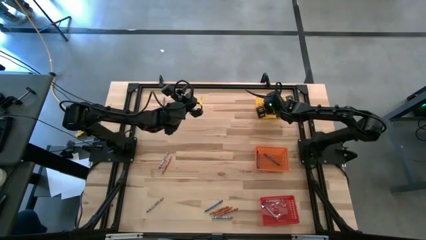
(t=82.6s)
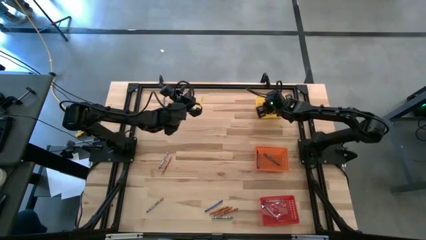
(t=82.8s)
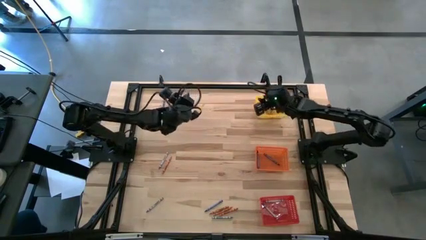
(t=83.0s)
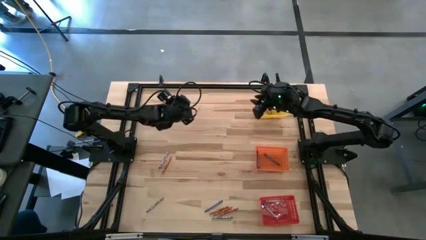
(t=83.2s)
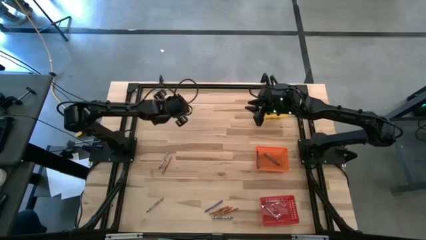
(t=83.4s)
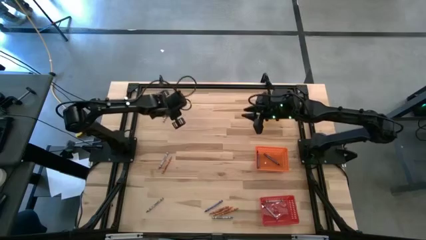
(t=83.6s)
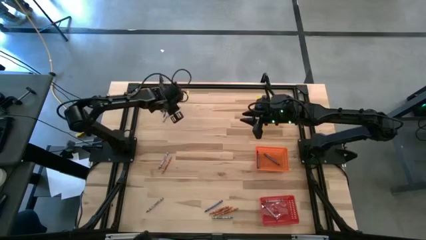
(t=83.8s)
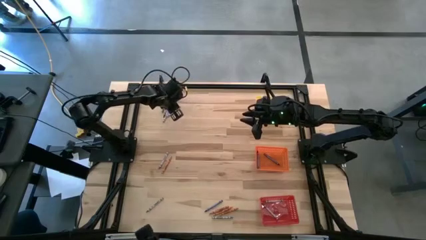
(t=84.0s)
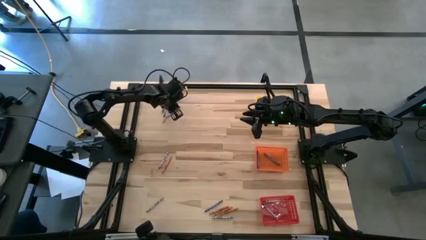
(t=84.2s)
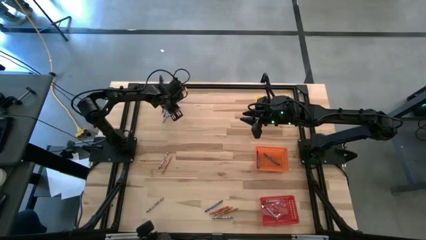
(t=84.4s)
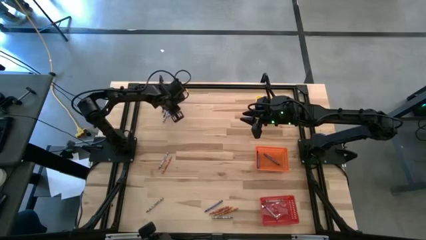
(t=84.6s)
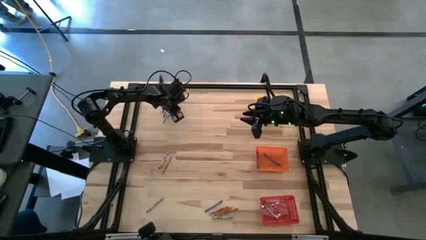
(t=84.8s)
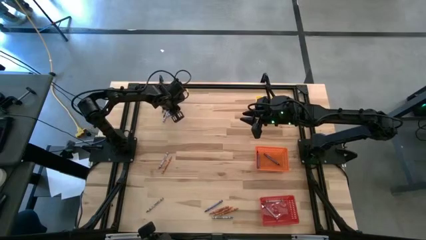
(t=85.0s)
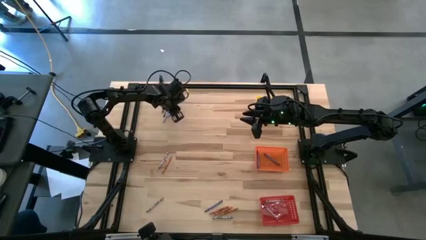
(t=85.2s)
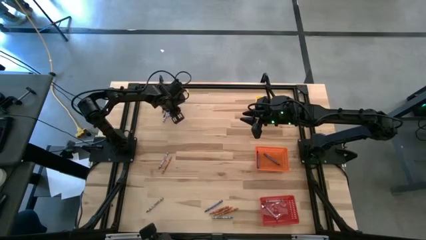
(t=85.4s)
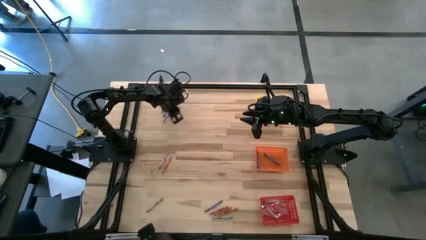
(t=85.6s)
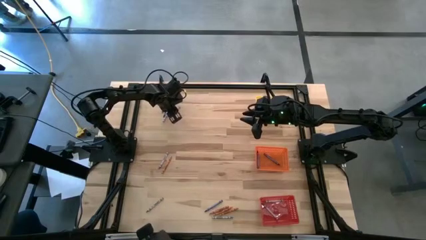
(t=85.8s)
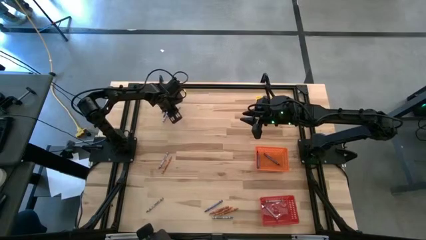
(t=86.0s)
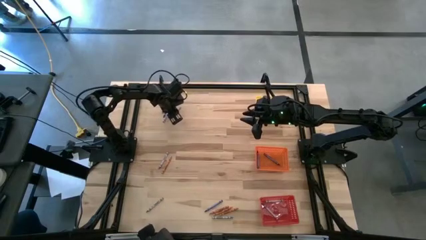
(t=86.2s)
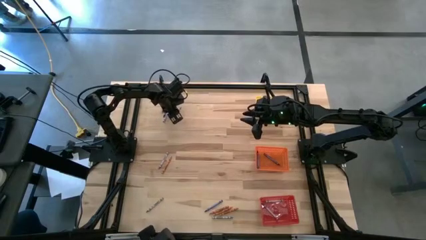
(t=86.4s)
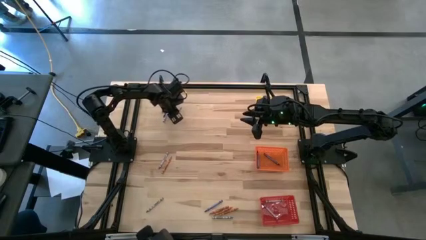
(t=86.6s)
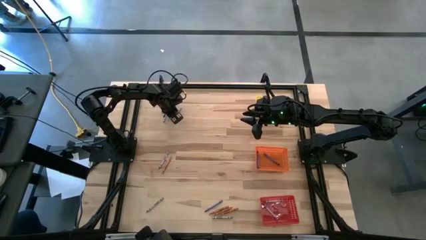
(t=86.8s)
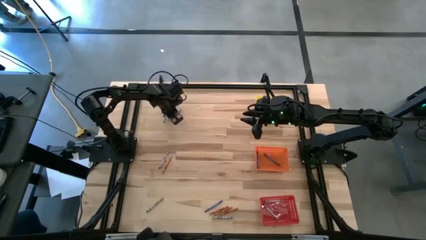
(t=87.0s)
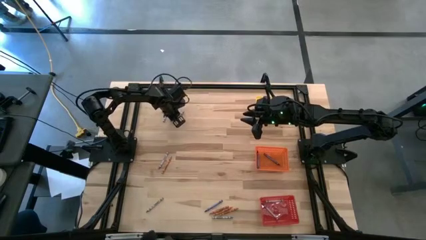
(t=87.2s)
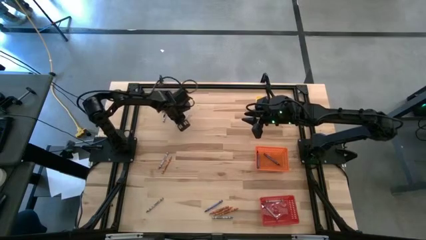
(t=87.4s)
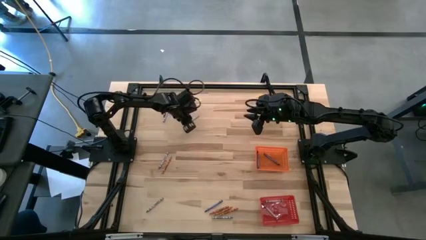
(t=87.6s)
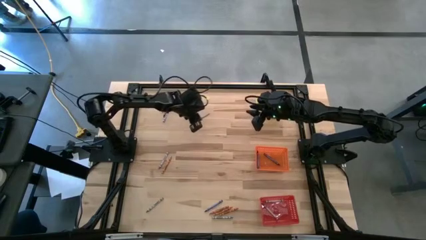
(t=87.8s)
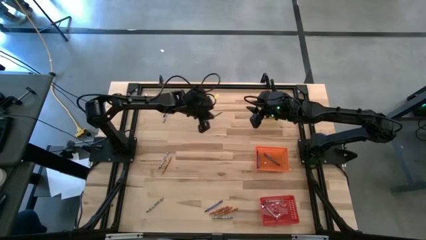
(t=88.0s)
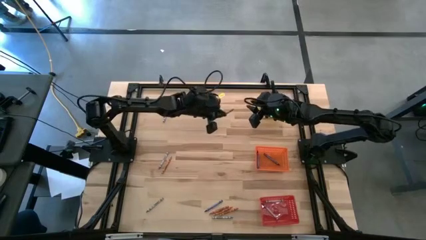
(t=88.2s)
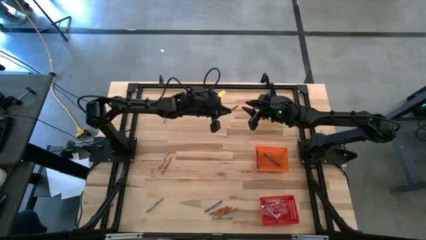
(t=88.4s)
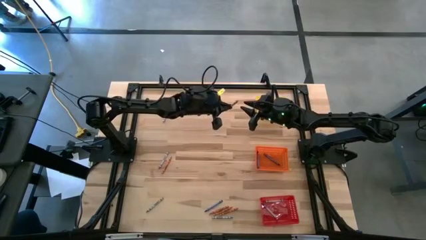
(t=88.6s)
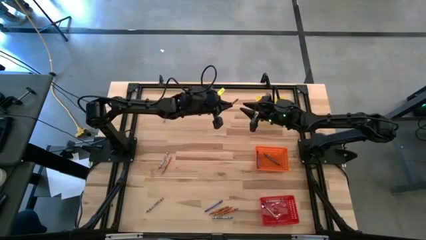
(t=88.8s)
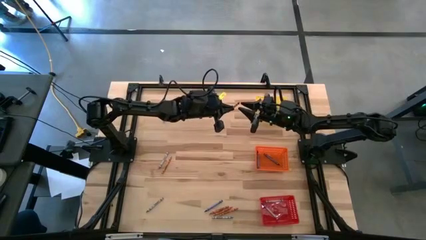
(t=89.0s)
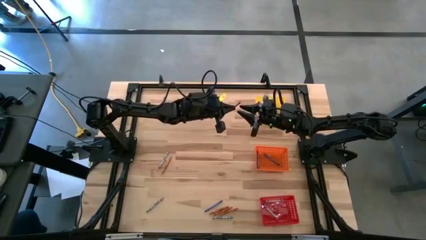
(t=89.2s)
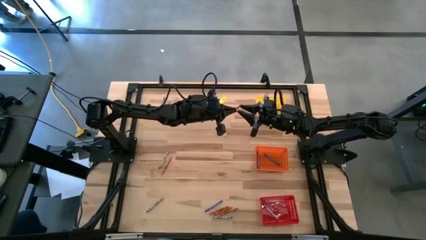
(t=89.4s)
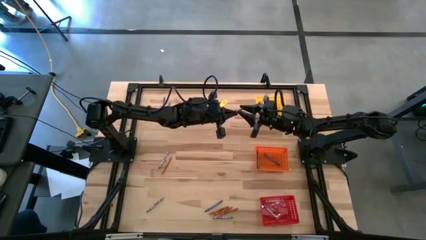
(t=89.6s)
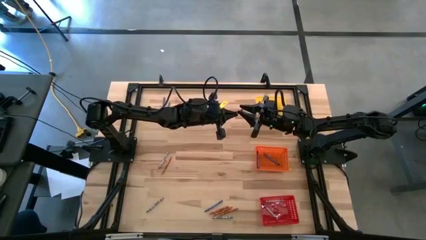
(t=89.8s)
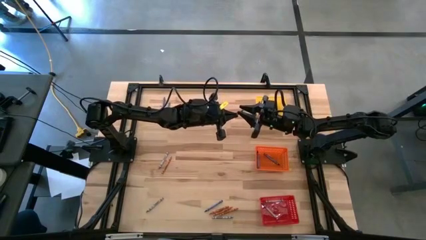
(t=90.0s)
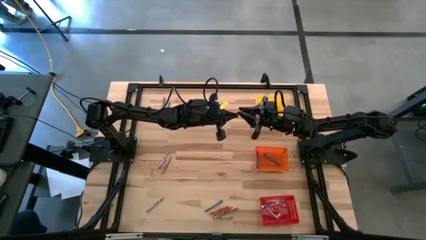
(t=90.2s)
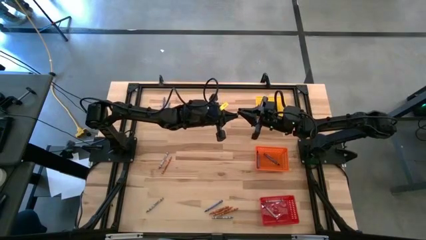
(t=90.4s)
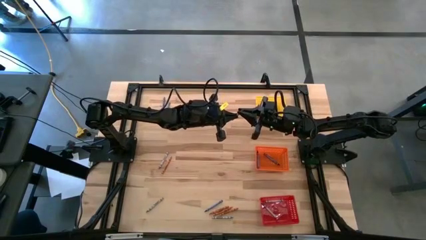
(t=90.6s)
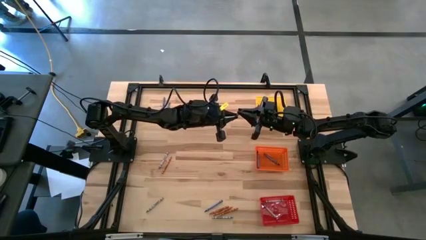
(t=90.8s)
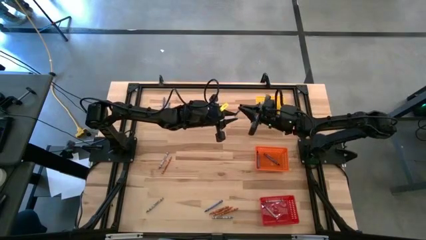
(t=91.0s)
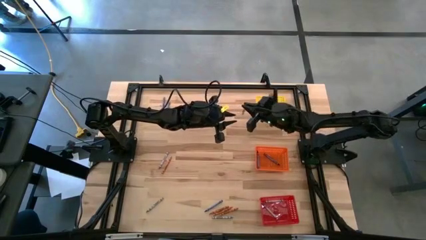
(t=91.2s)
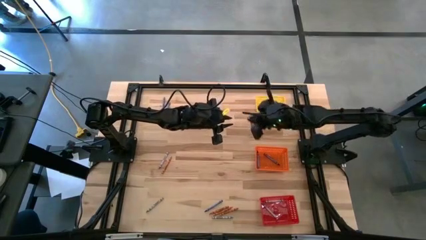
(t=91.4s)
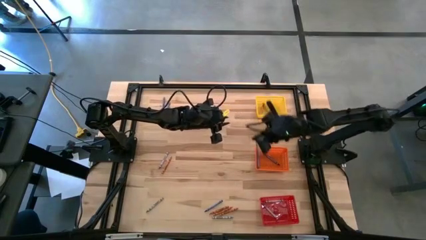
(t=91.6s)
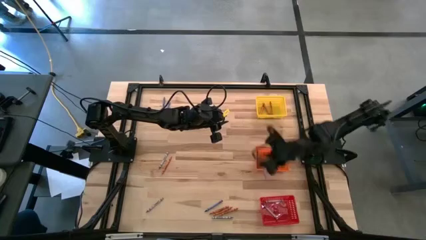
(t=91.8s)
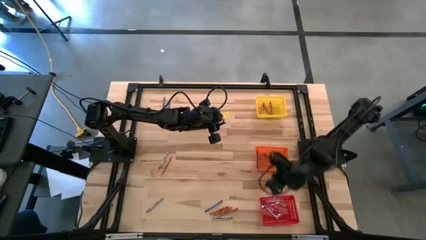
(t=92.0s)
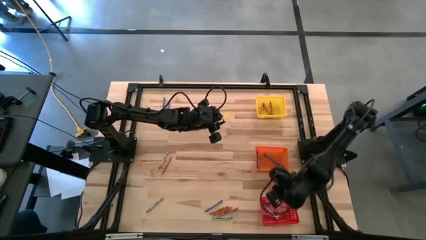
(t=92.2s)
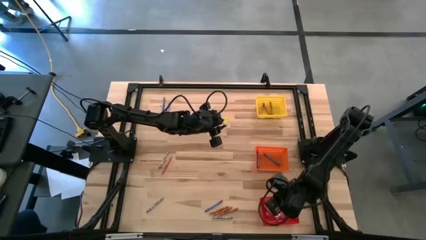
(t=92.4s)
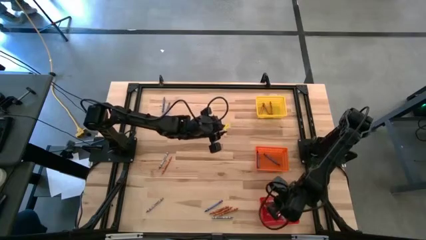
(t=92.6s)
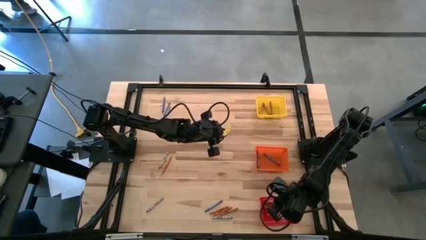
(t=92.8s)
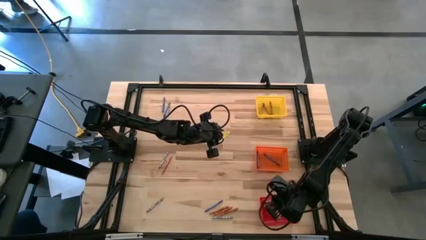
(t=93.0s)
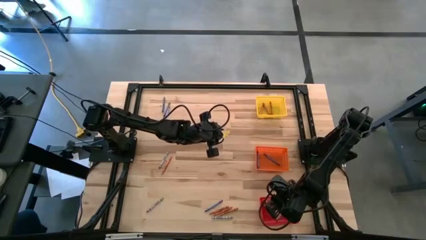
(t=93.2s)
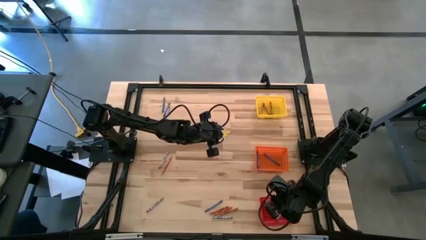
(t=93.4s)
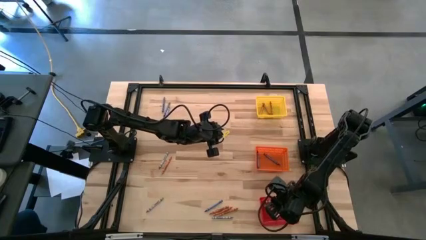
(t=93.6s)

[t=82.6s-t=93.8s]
Task: Sort crayons
Put the gray crayon into the red bin
